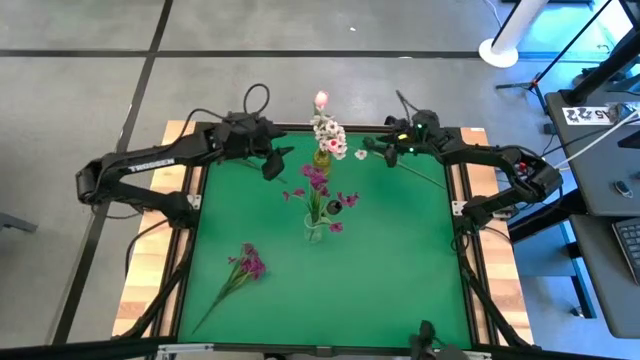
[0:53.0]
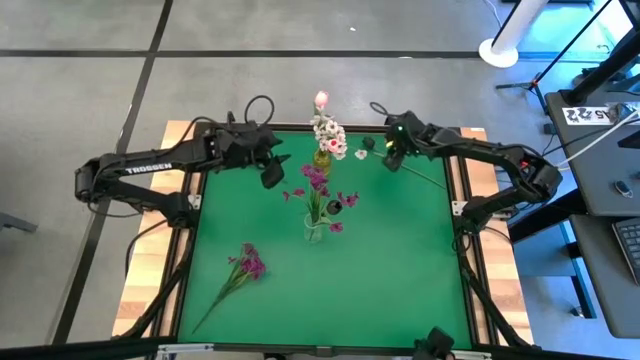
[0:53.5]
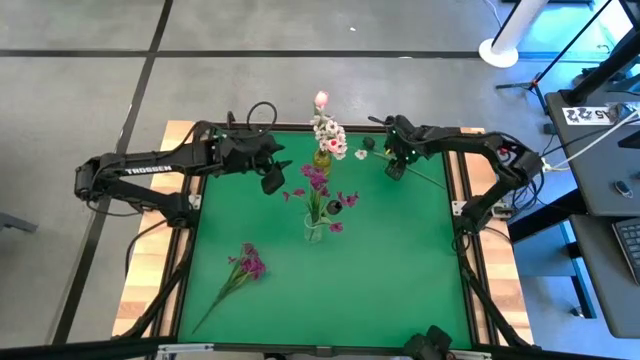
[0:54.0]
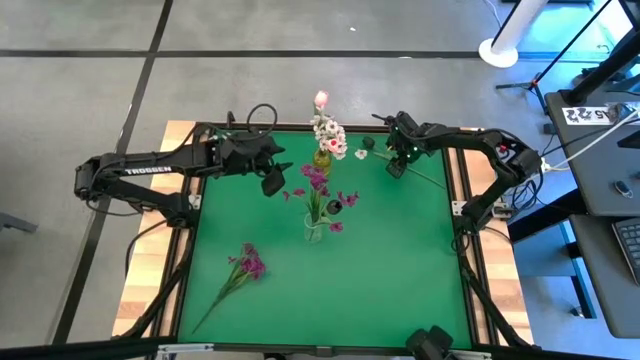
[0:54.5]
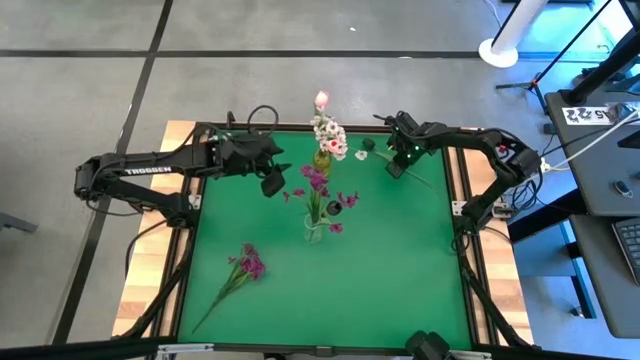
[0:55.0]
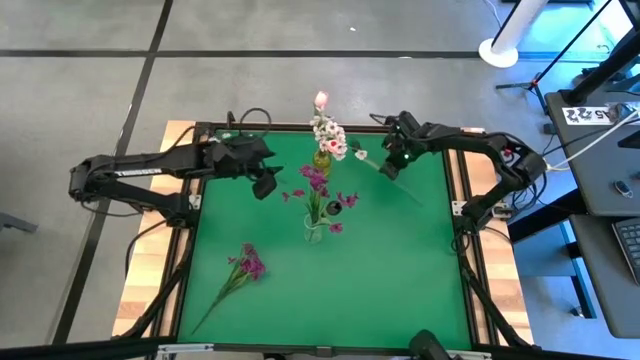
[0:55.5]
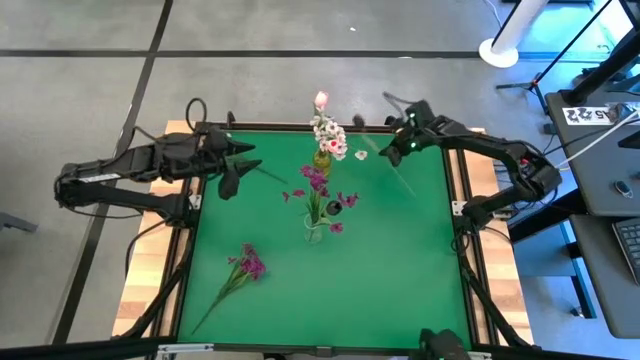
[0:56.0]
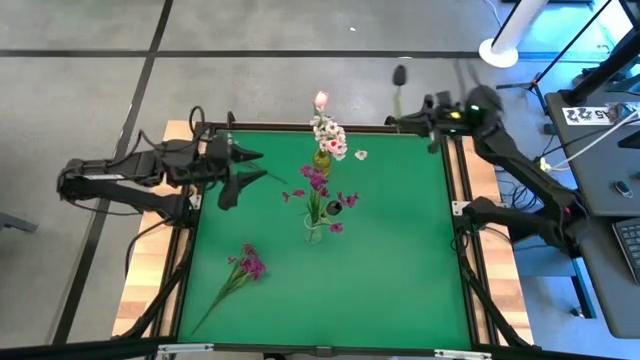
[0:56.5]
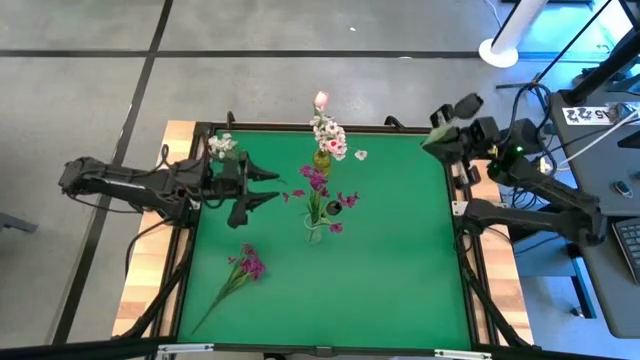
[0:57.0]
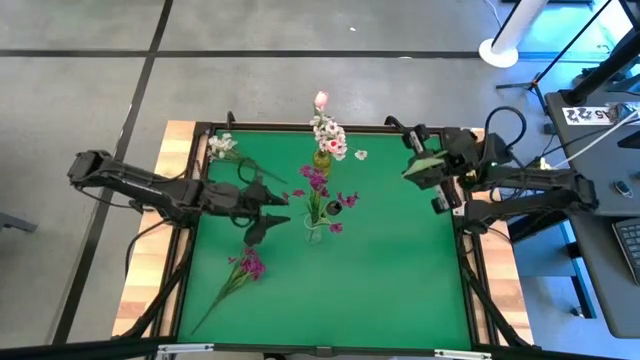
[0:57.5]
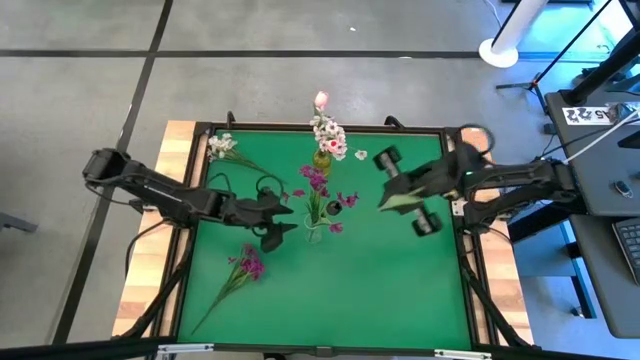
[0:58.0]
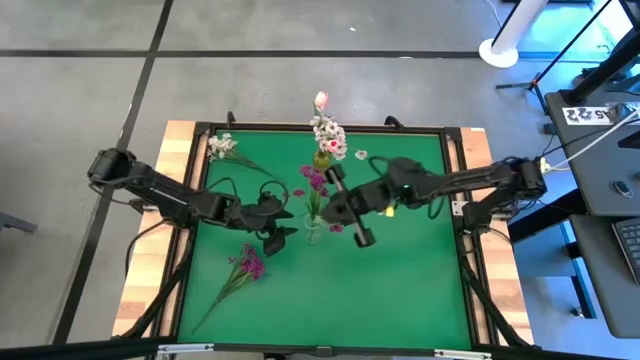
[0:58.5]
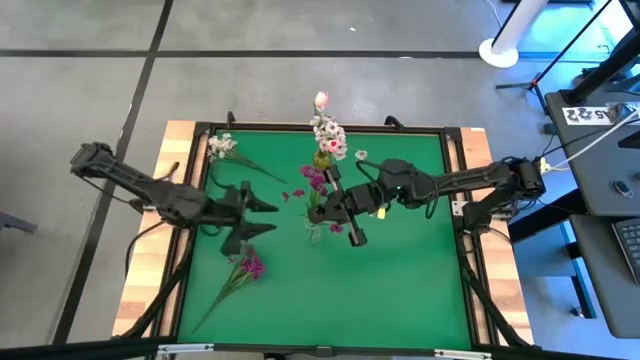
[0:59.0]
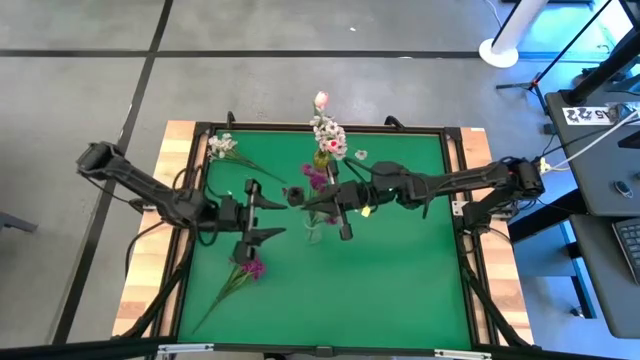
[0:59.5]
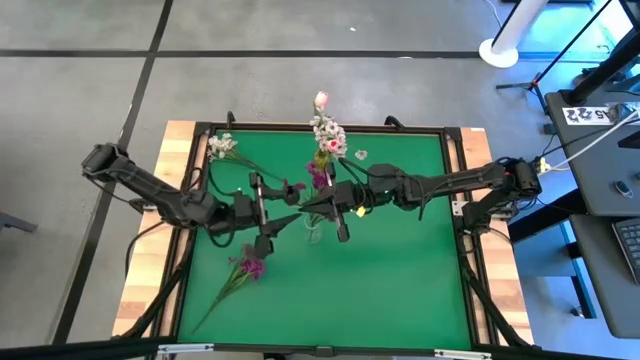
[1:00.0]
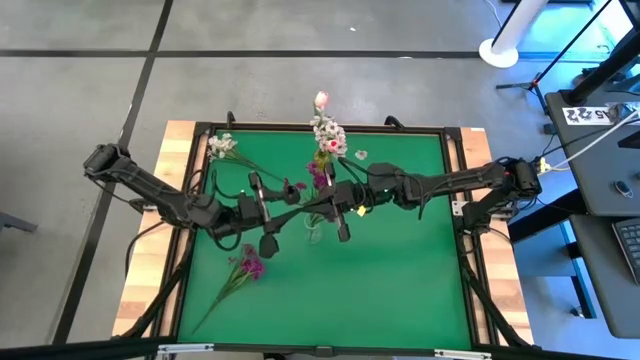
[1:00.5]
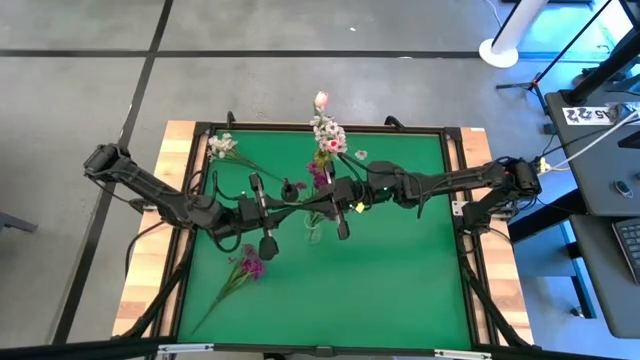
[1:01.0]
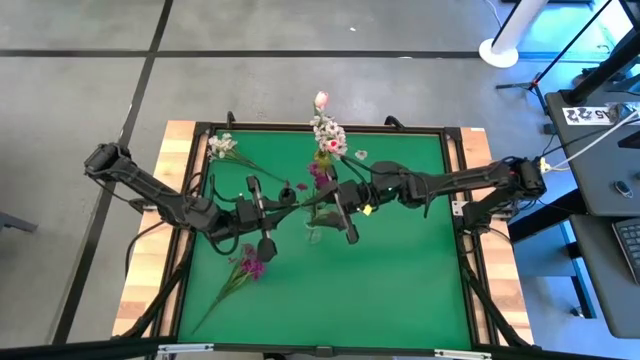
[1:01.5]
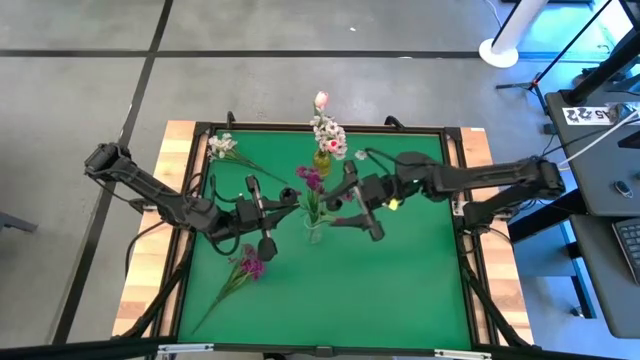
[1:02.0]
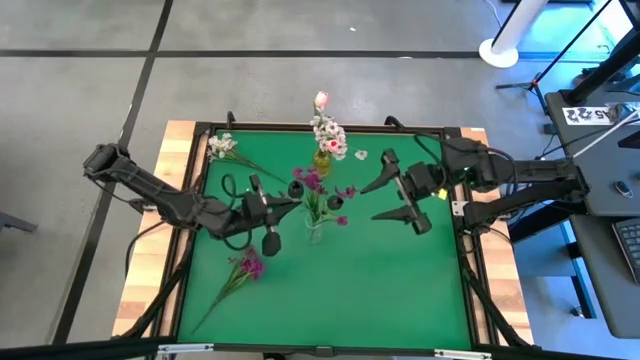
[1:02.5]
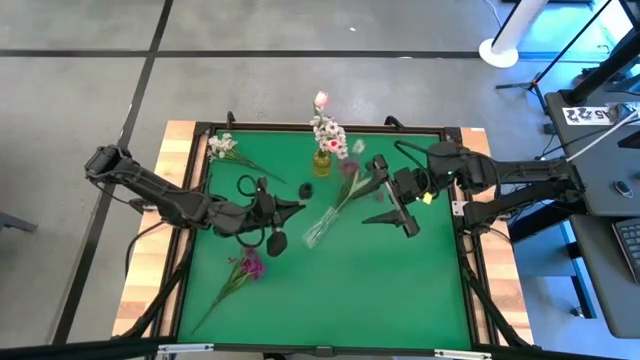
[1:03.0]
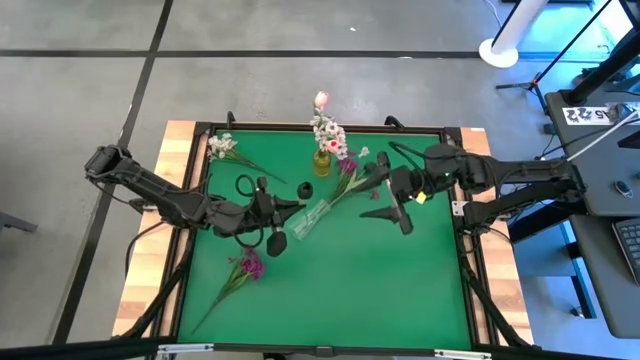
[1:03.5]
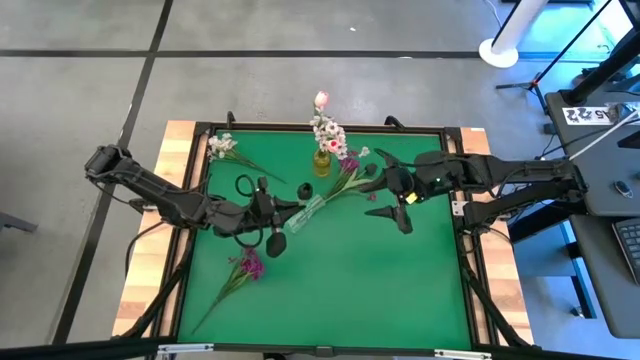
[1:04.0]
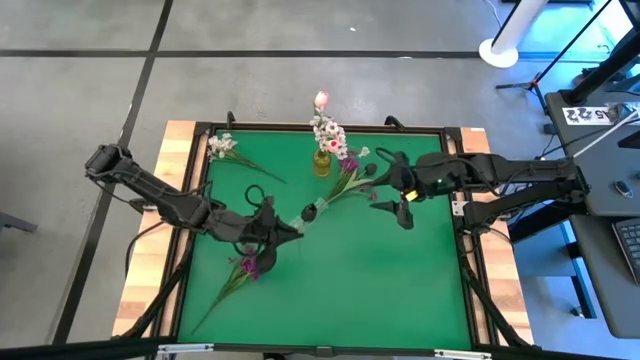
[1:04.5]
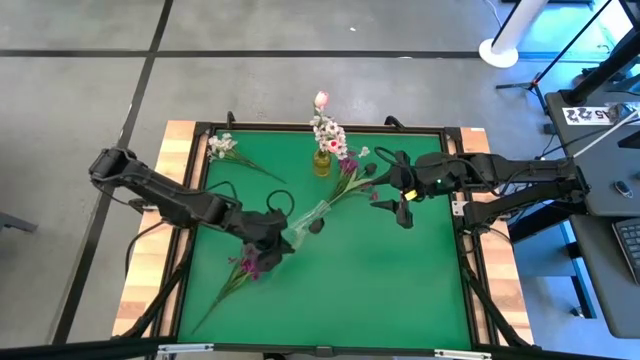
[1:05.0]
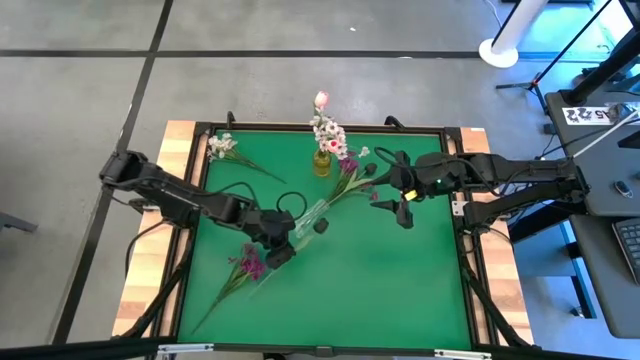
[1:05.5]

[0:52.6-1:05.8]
Task: Sort flowers into vase by color
Put the black flower into the transparent vase

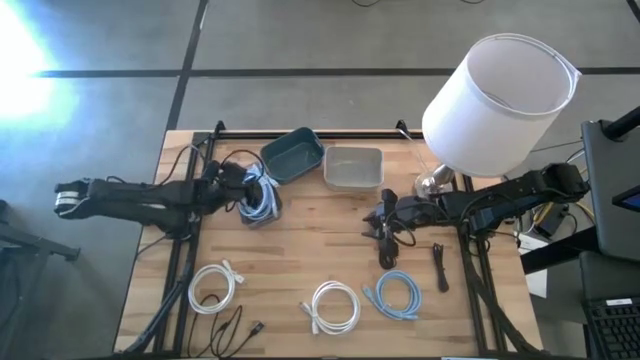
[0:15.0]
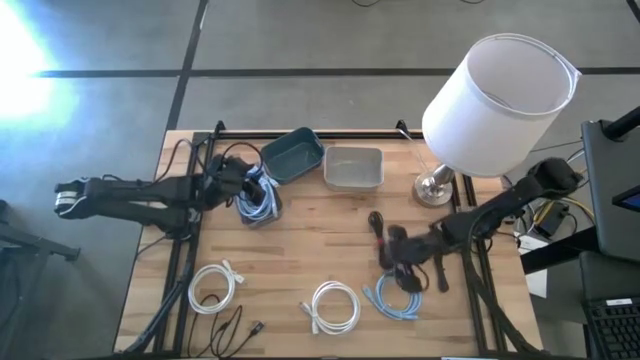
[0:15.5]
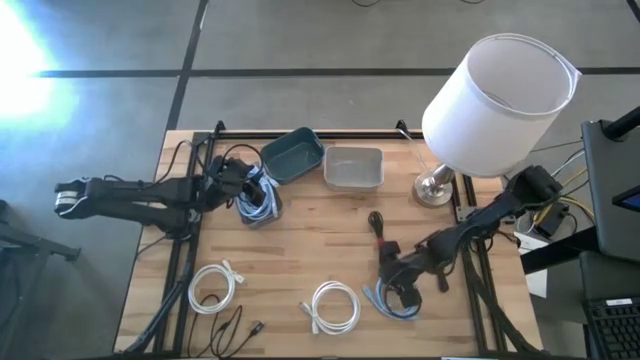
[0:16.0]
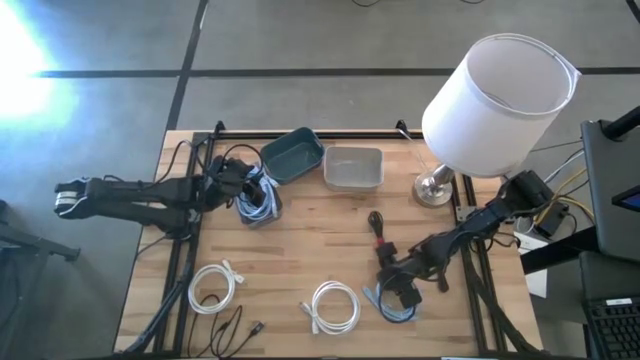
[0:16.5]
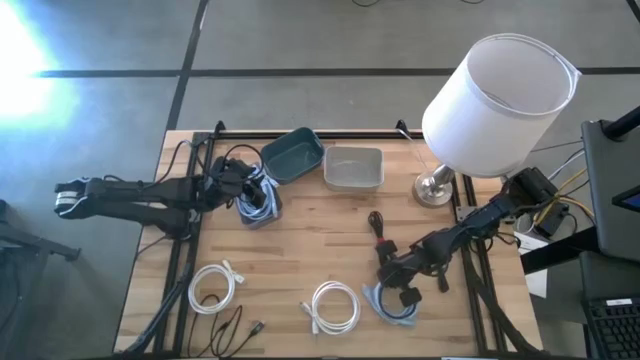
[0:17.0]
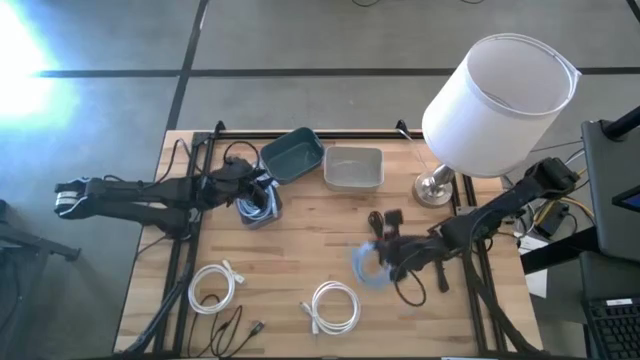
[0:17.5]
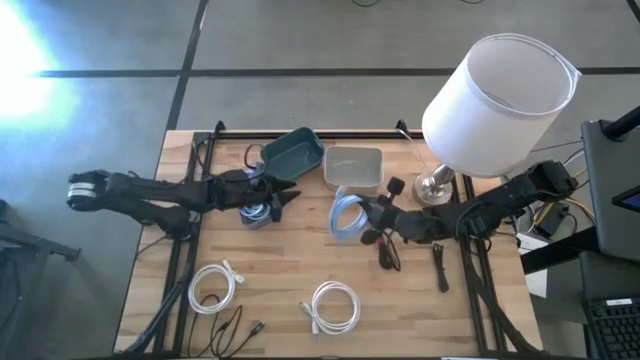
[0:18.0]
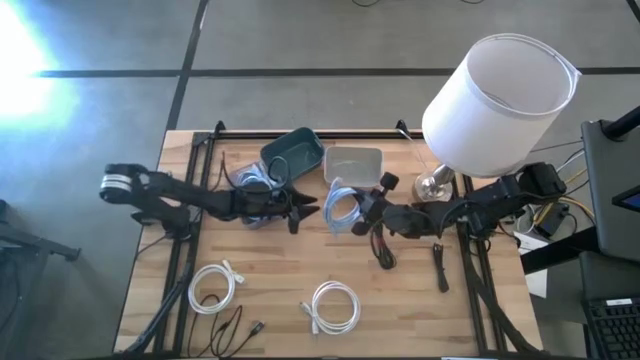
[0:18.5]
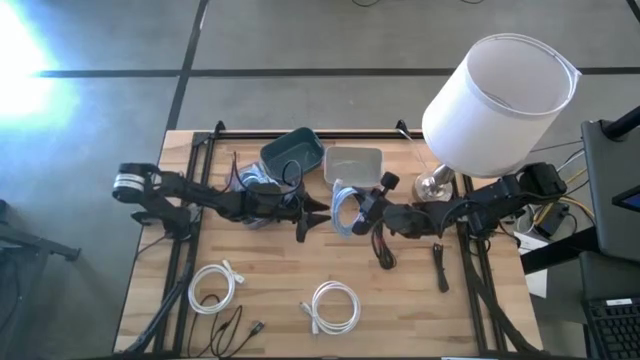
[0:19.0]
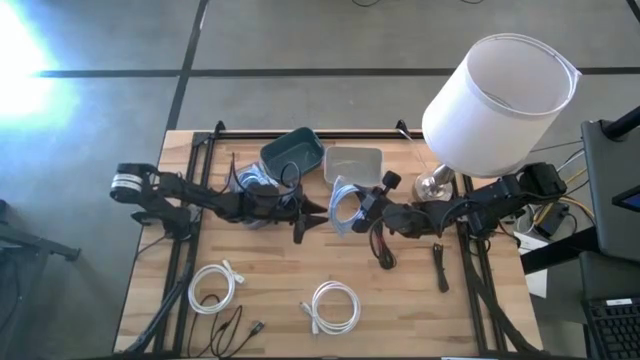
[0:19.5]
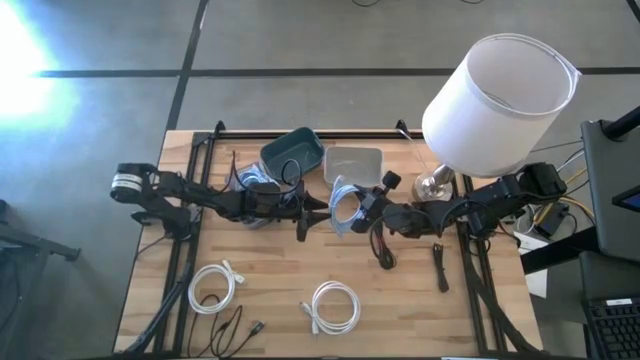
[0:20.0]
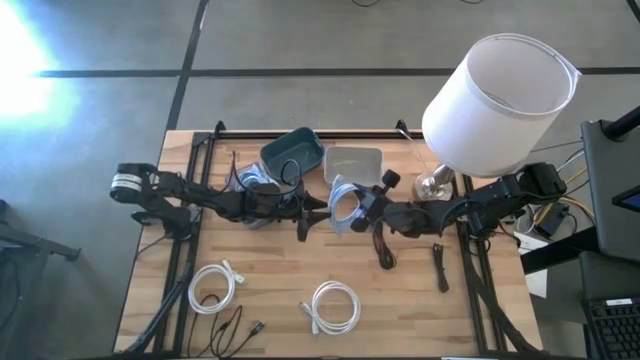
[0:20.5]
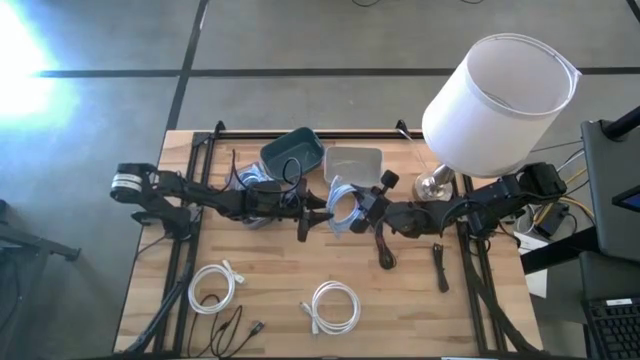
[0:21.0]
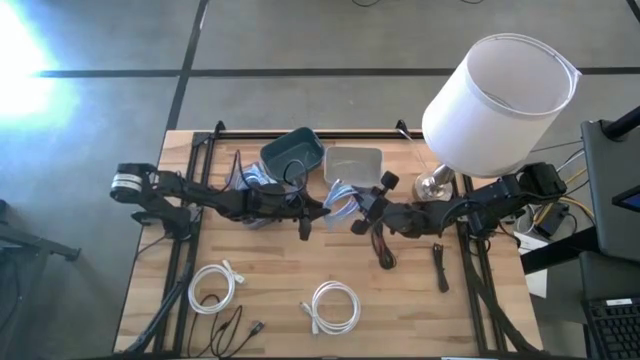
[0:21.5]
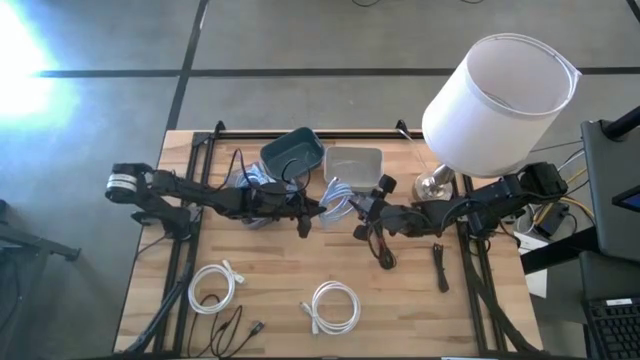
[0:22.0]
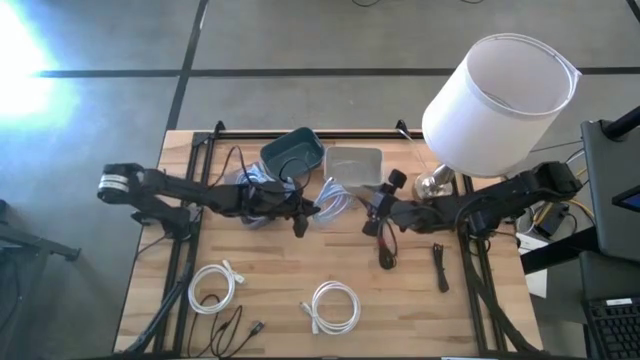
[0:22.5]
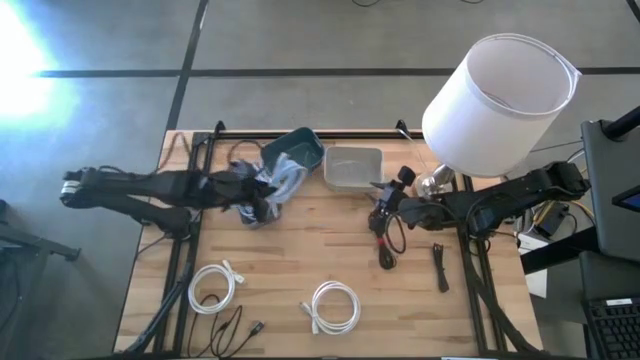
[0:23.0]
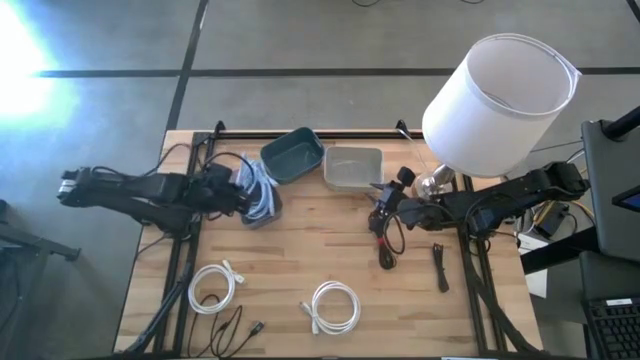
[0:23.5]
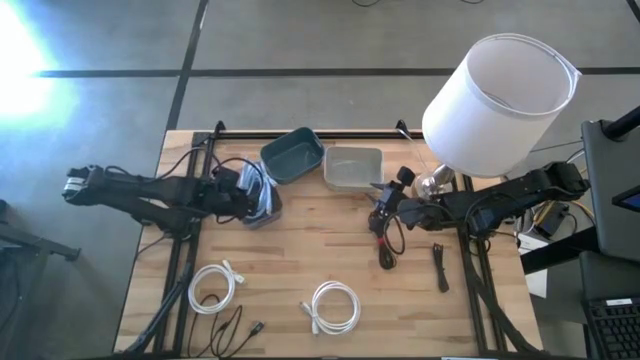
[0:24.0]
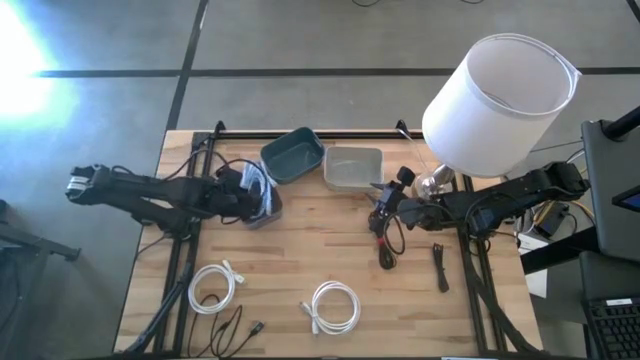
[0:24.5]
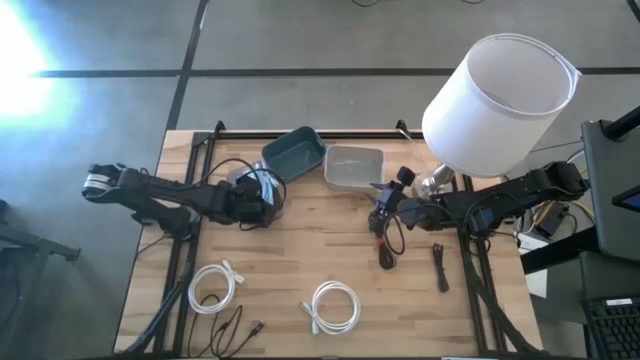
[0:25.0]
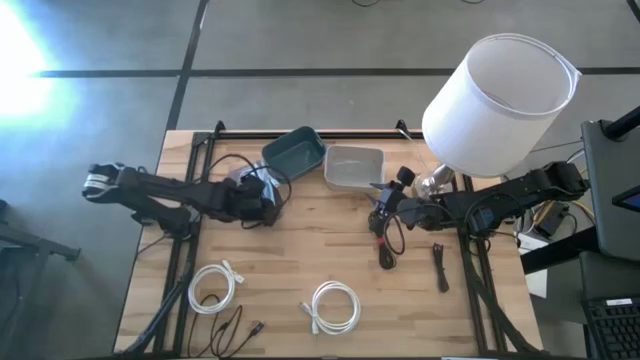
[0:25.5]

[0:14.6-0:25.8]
Task: Pick & Place USB Port
Put the blue HDMI cable into the gray bin
